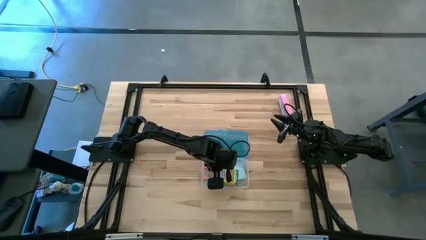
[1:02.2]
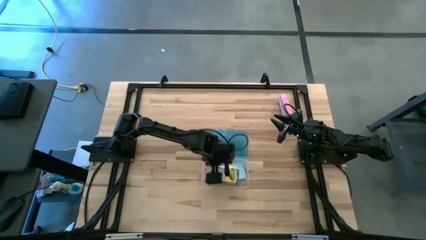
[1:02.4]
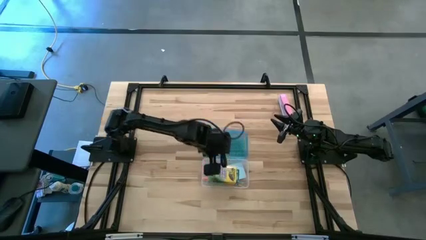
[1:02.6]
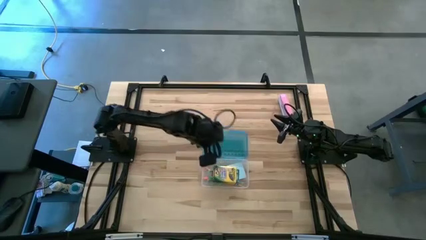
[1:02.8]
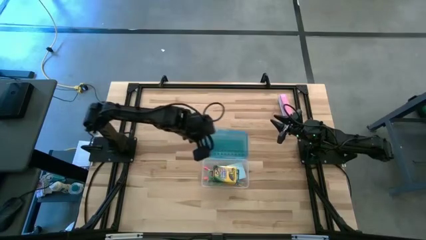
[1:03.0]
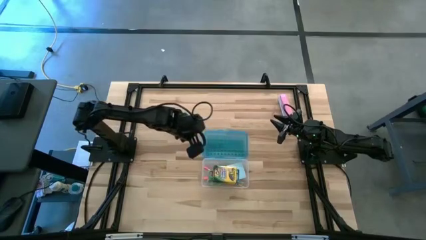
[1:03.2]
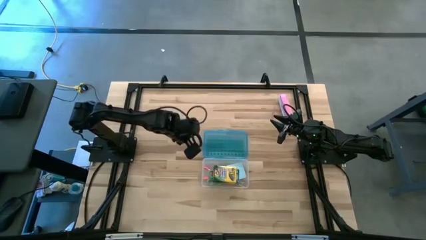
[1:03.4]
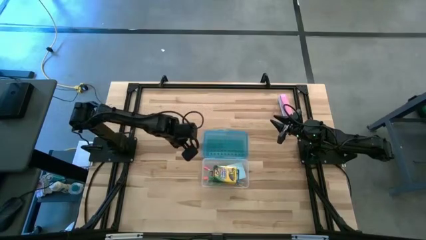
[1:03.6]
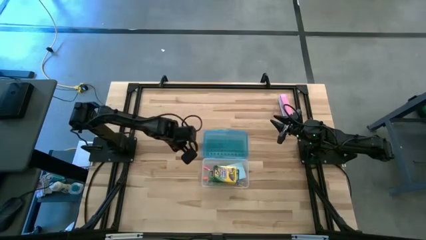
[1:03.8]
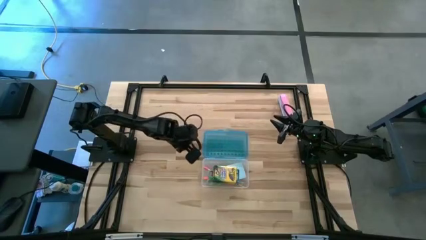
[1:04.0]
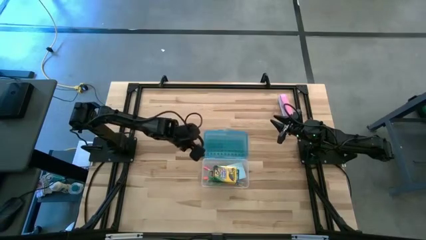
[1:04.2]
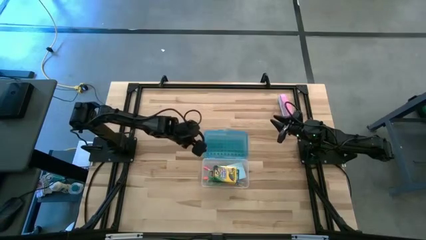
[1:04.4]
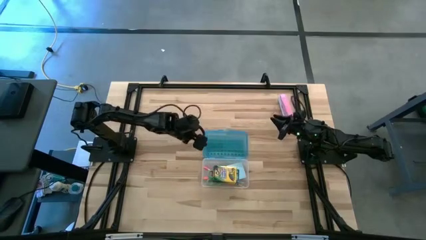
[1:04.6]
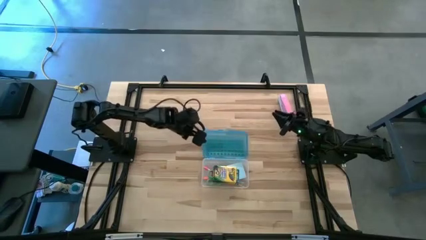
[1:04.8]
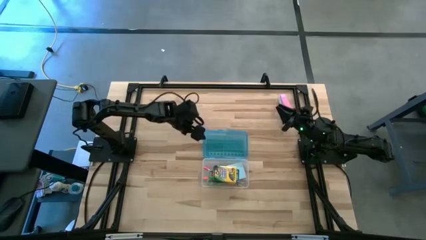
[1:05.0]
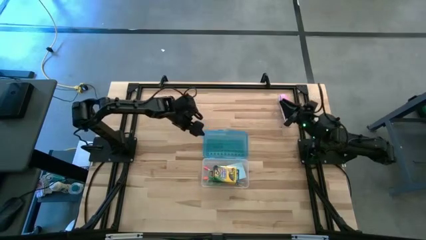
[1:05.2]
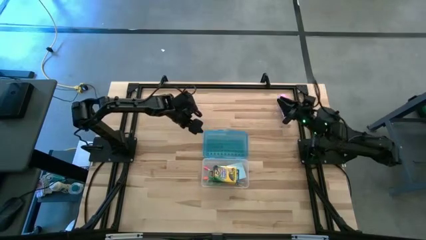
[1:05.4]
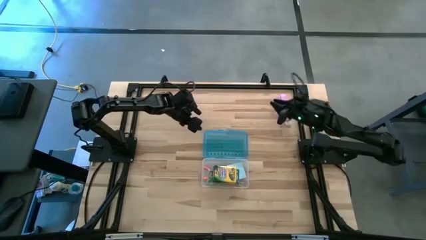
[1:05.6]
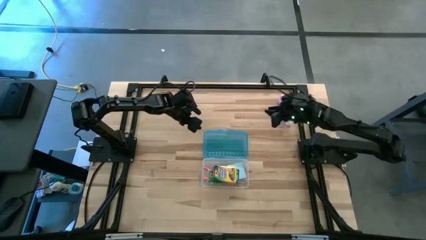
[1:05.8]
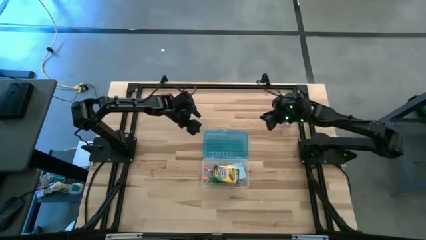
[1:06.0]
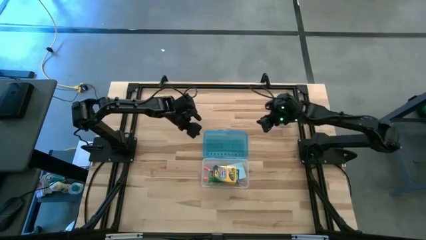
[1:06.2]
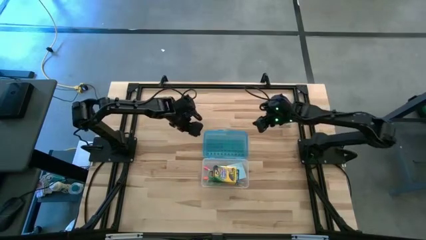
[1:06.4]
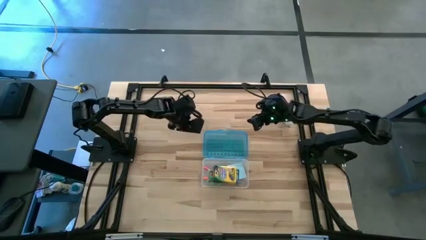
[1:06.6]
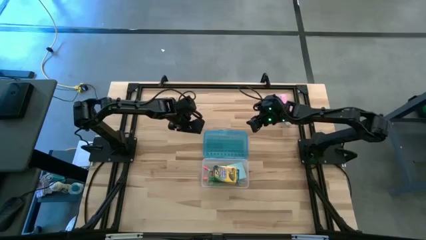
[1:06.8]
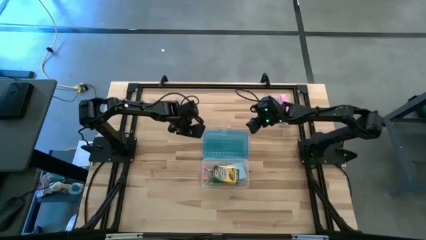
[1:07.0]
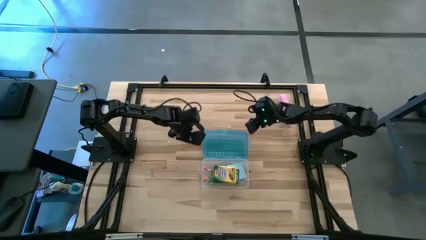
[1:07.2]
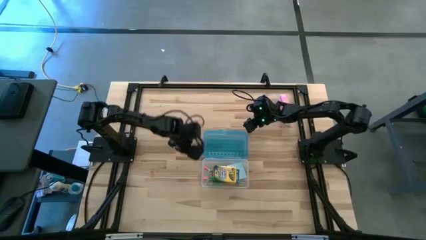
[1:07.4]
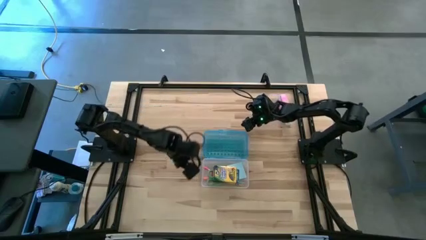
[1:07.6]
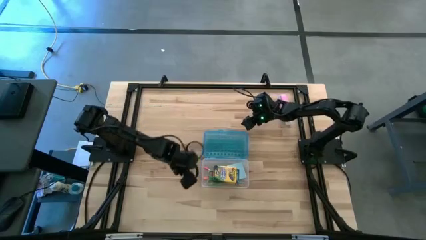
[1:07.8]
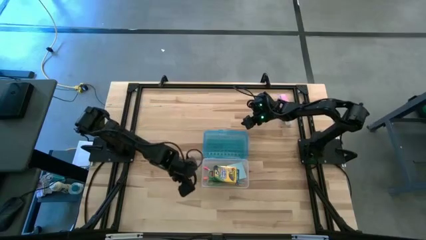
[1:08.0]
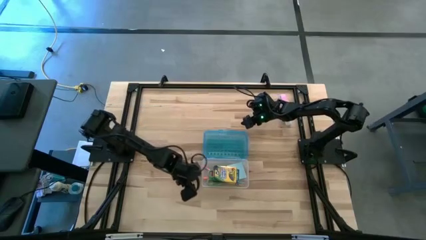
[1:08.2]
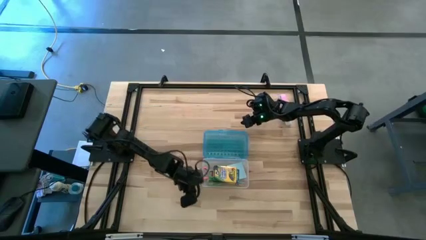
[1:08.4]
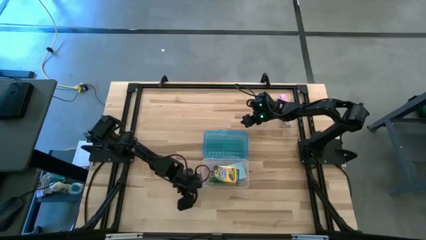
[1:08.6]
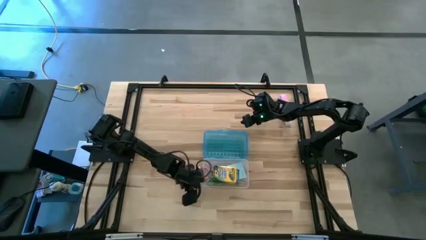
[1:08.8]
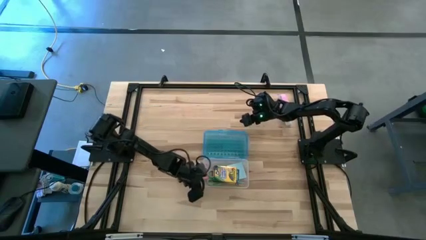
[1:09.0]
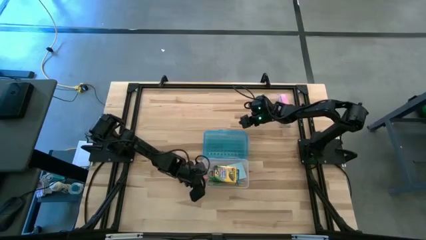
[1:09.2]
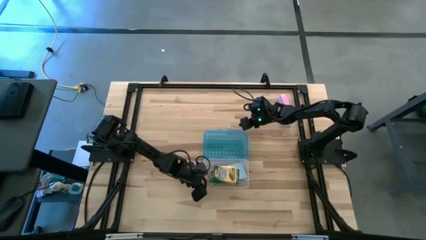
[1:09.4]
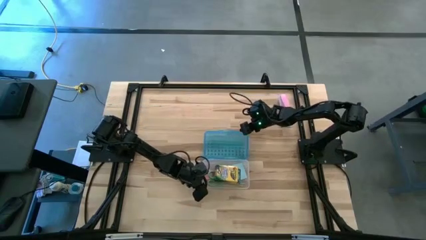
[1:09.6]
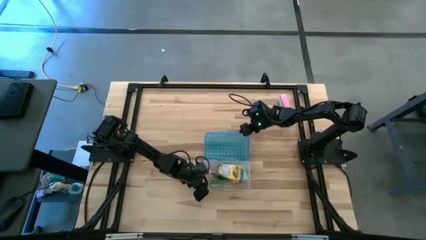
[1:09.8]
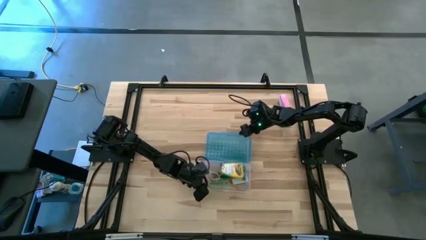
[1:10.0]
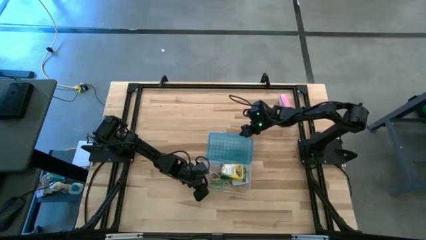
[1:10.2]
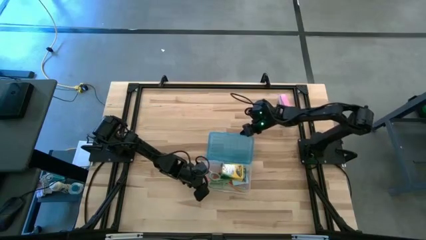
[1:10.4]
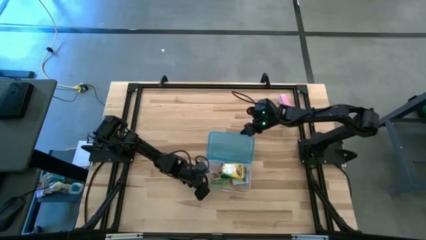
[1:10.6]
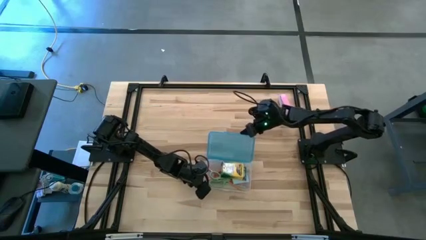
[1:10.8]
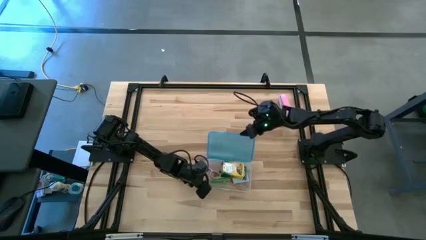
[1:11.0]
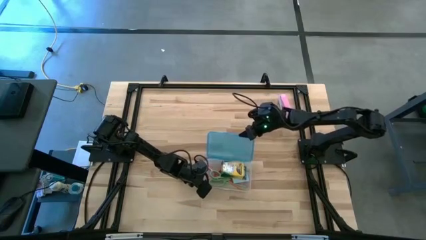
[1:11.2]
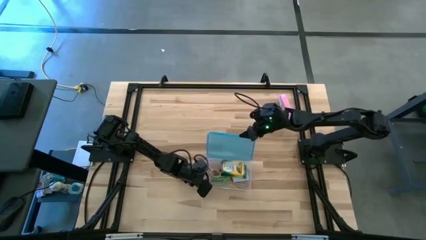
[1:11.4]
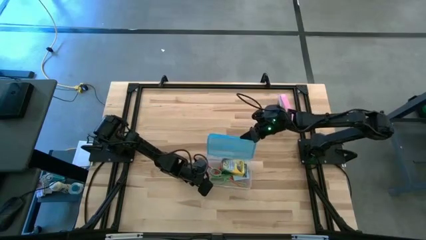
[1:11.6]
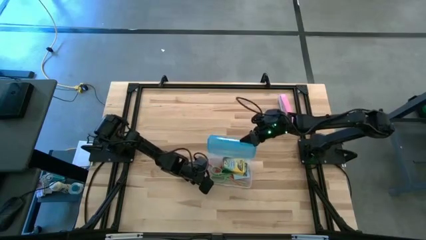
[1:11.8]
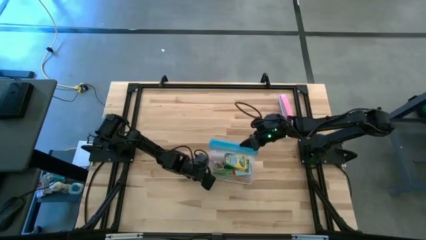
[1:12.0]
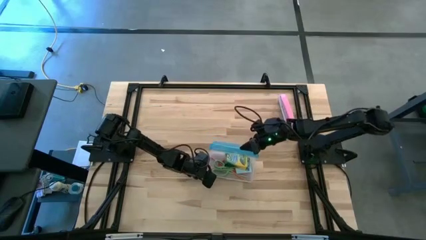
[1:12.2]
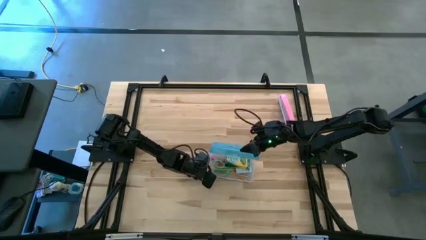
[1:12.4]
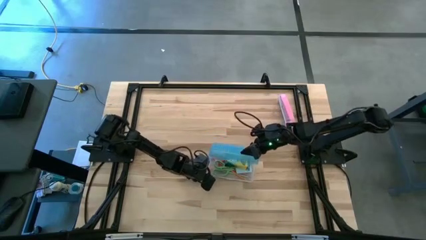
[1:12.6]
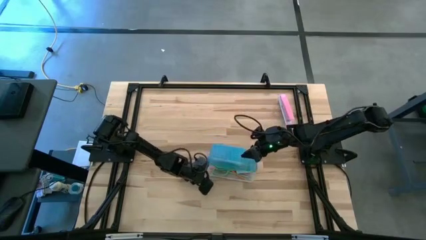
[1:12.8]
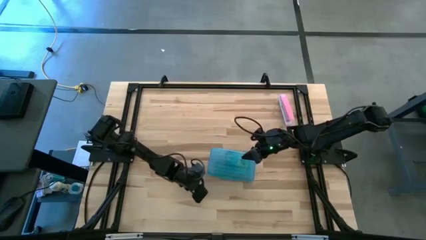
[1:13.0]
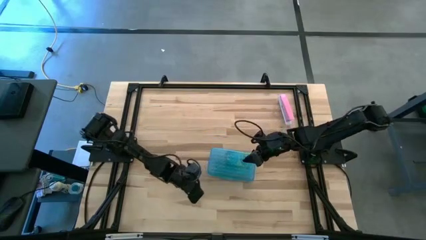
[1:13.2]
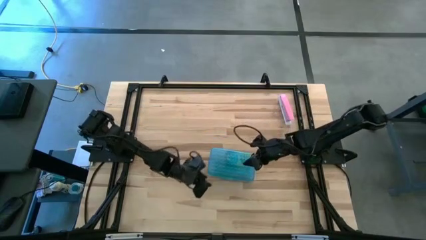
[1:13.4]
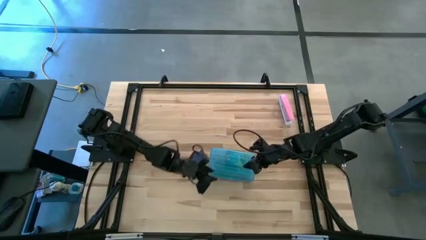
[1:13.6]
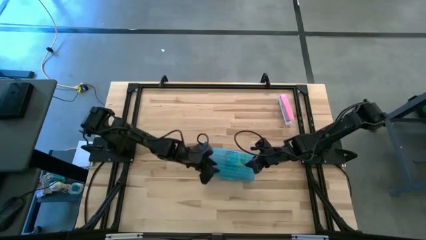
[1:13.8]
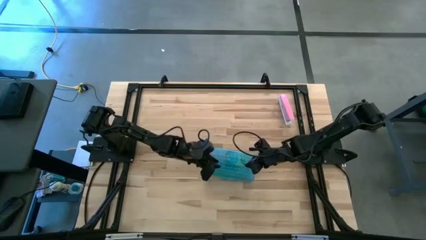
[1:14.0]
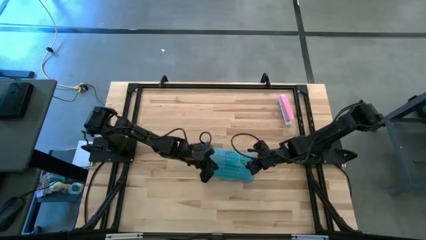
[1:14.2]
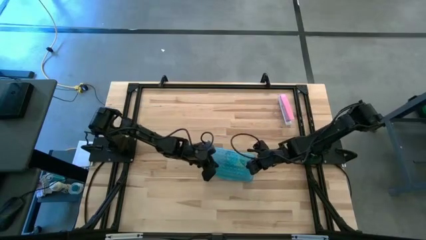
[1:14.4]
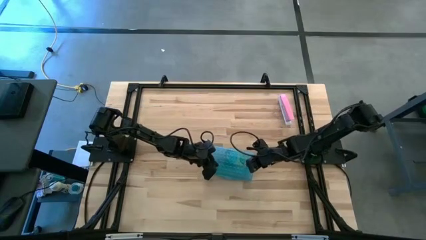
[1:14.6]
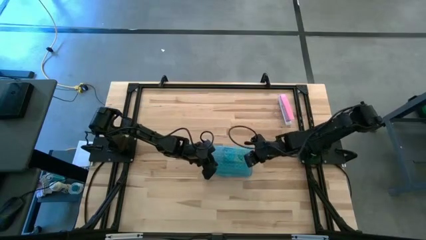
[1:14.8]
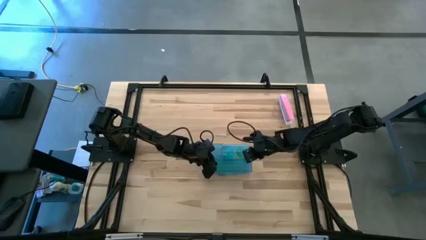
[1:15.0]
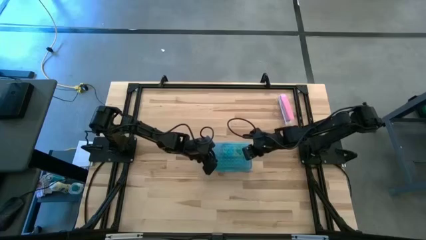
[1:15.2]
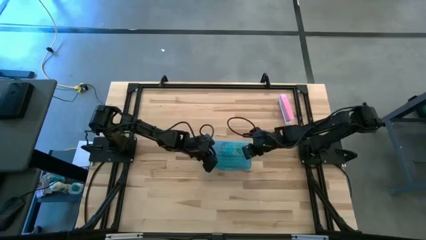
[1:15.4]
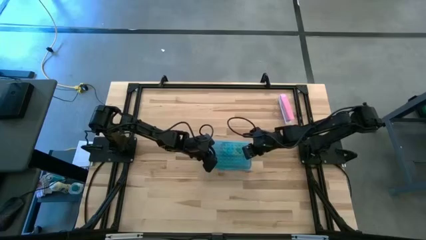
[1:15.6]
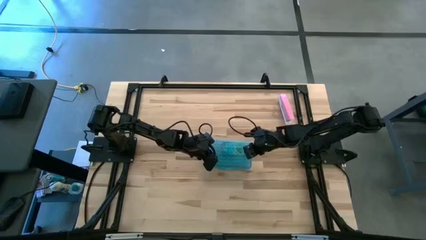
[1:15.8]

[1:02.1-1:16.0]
Task: Pack school essentials
Close the blue supply box

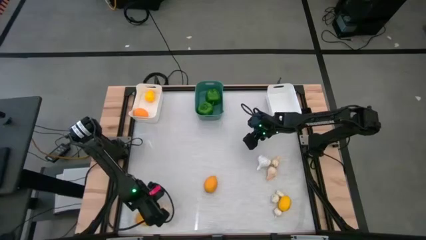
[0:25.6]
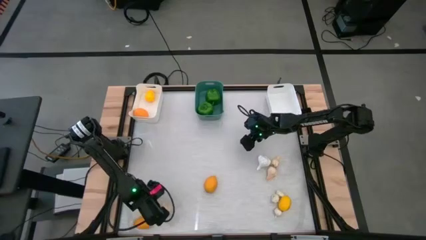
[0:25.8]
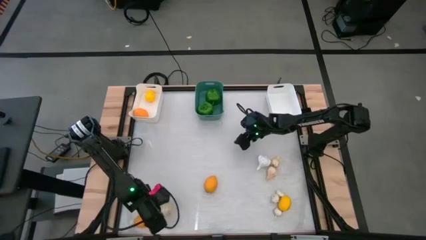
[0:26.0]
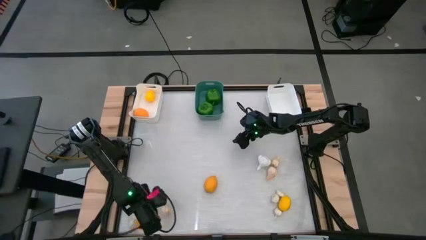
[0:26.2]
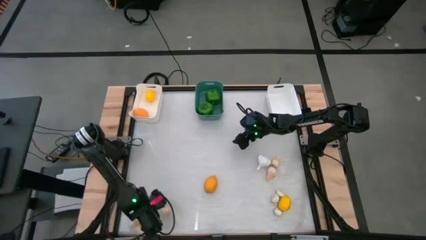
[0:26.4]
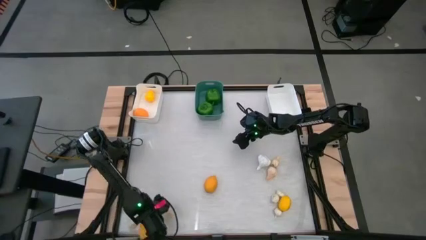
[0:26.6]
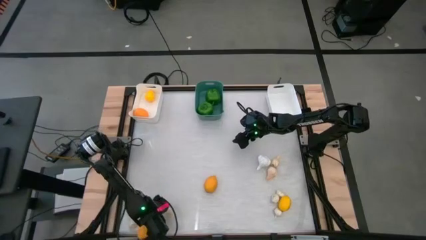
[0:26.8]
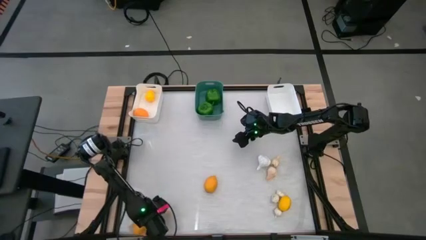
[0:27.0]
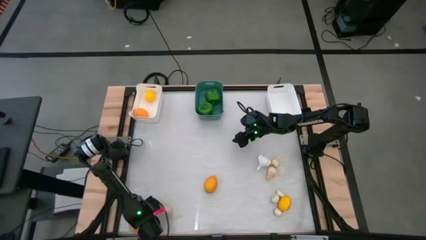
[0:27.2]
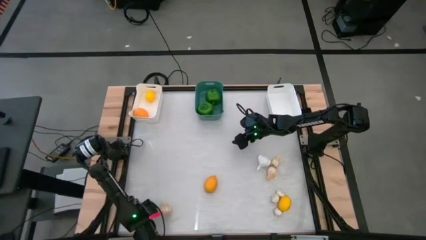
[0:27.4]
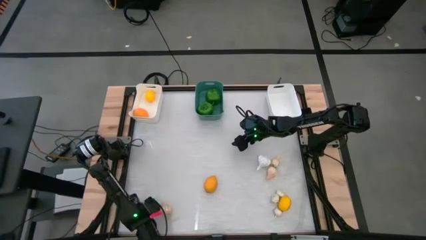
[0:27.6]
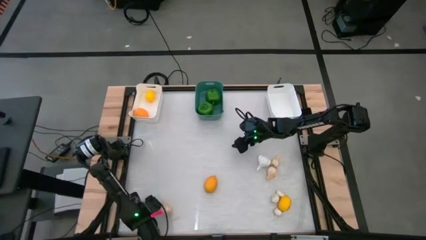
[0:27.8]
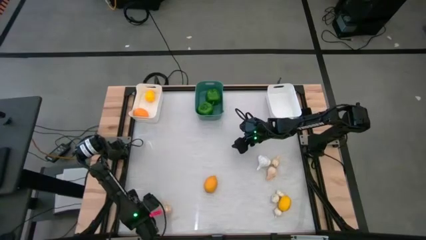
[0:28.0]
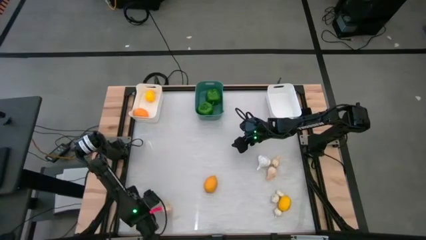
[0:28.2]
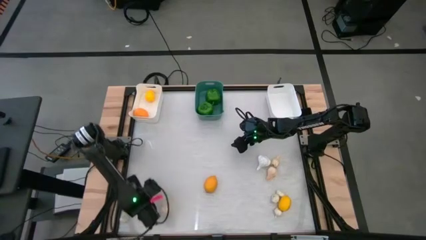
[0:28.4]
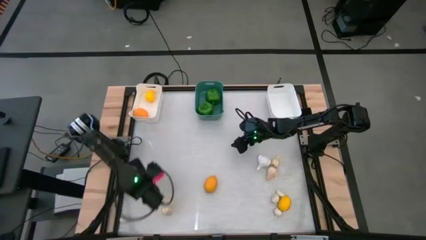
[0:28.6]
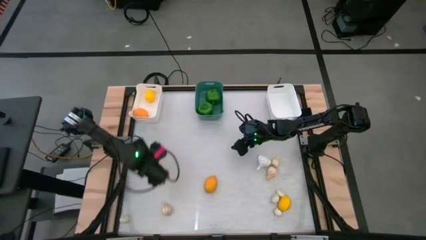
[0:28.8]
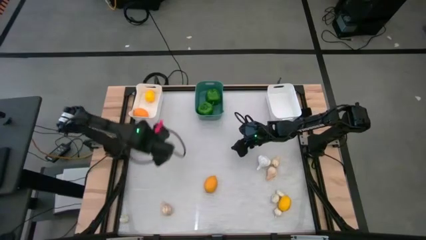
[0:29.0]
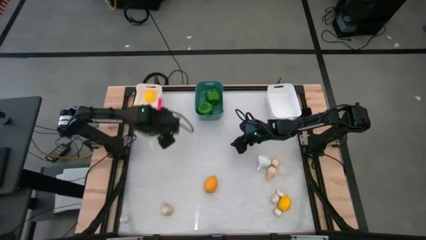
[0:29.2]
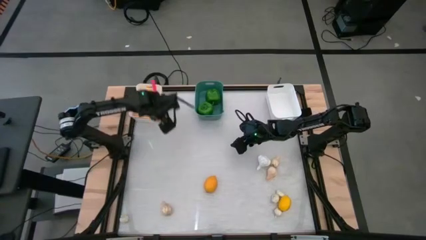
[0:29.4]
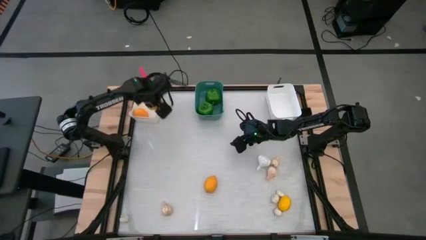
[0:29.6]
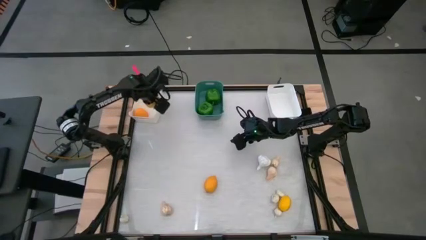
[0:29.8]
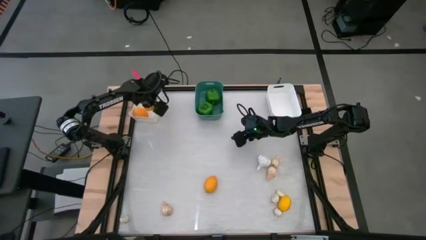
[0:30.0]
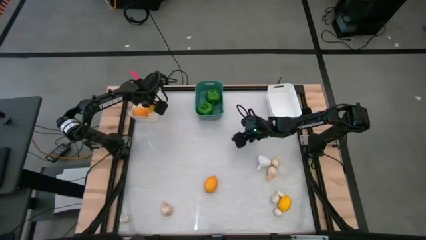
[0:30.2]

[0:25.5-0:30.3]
Task: Sort produce into baskets
Put the bottom left yellow lemon into the left white bin
